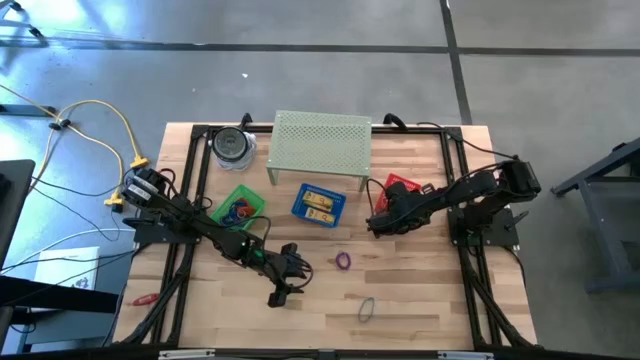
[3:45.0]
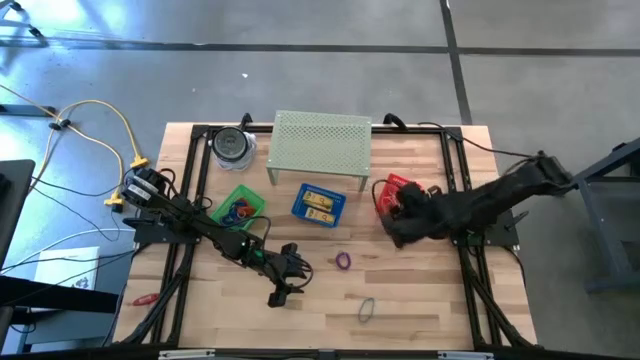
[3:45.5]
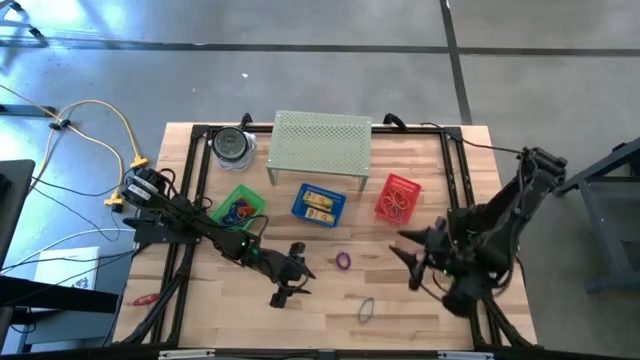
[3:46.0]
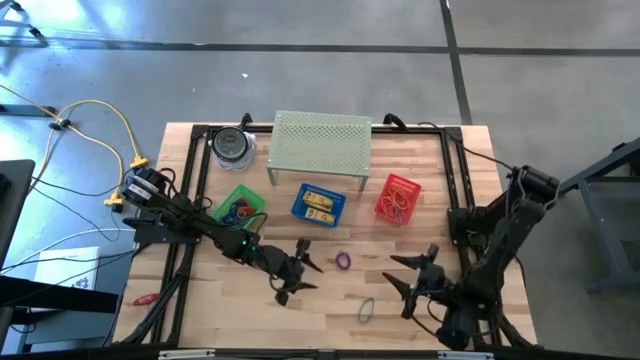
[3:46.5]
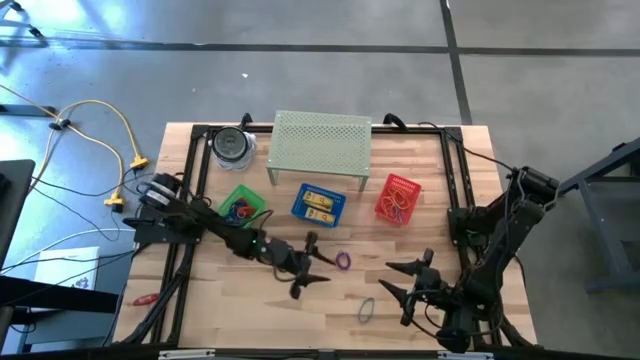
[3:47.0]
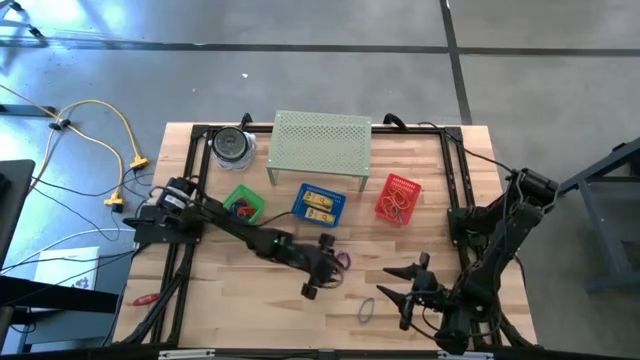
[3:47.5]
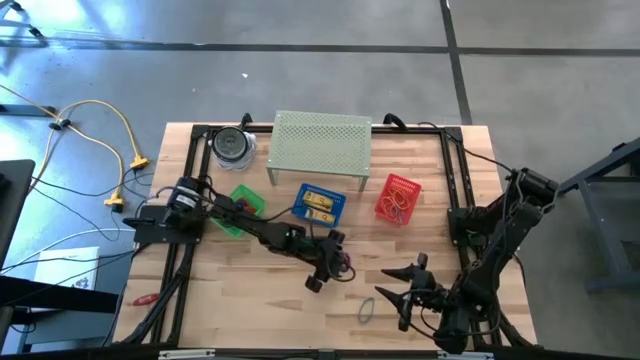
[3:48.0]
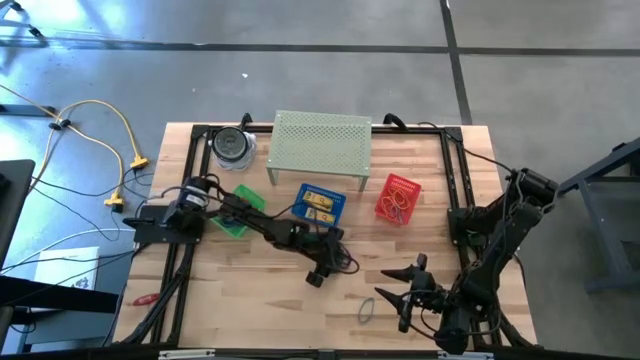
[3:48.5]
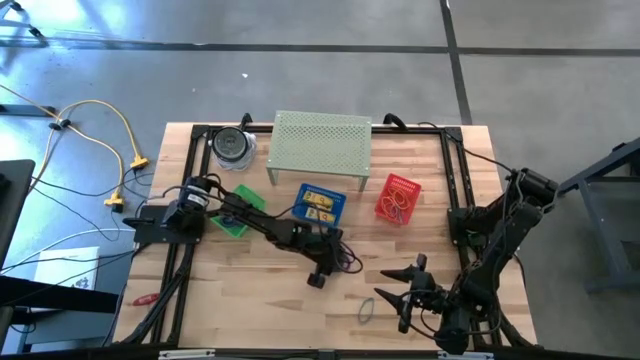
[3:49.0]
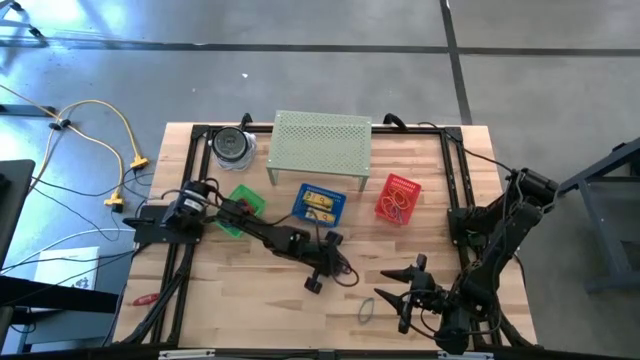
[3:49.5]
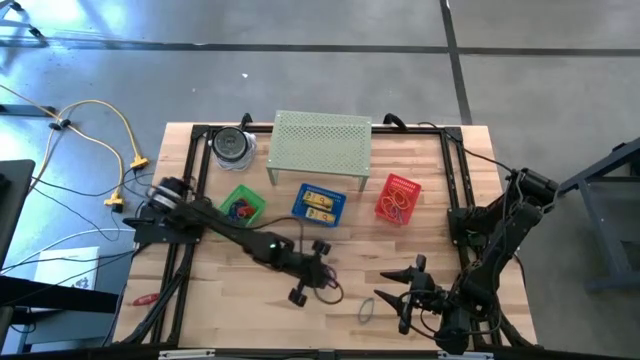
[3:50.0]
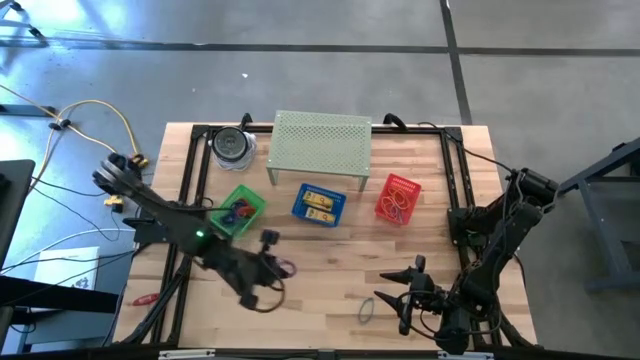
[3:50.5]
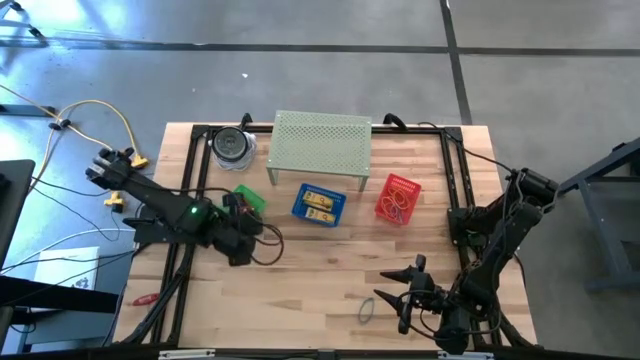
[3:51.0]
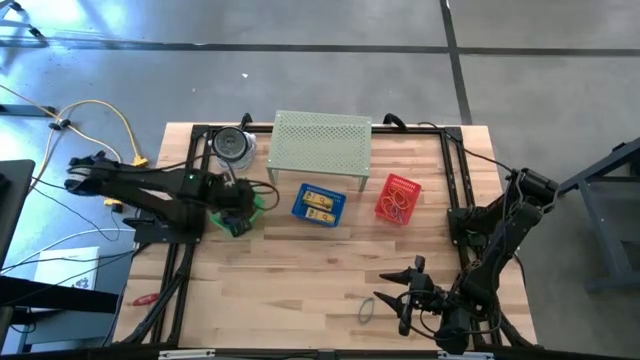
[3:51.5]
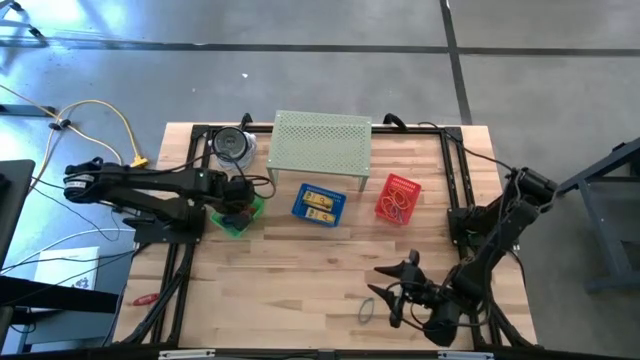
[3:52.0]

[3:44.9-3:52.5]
Task: Pick & Place Office Desk Supplies
Put the purple spring keychain into the green bin

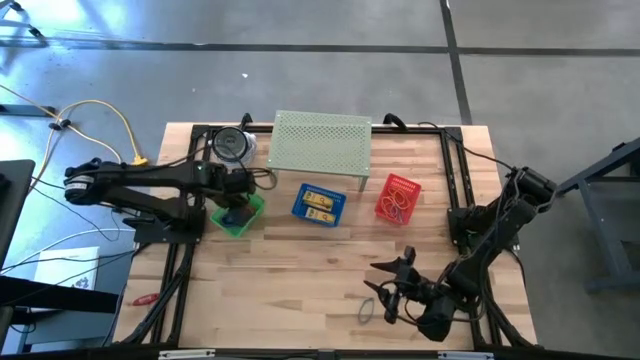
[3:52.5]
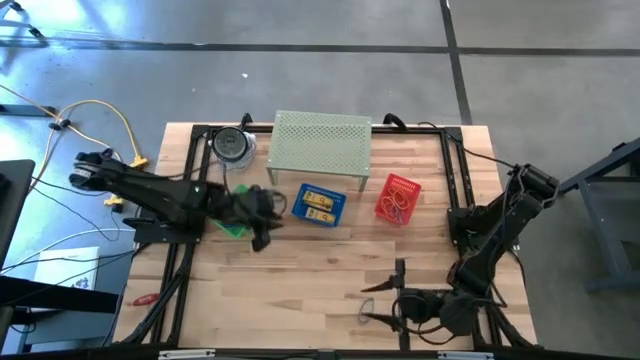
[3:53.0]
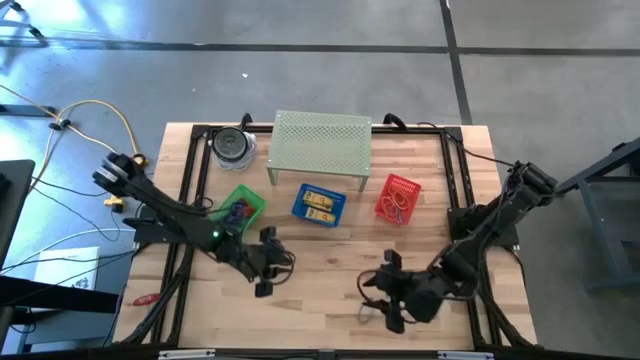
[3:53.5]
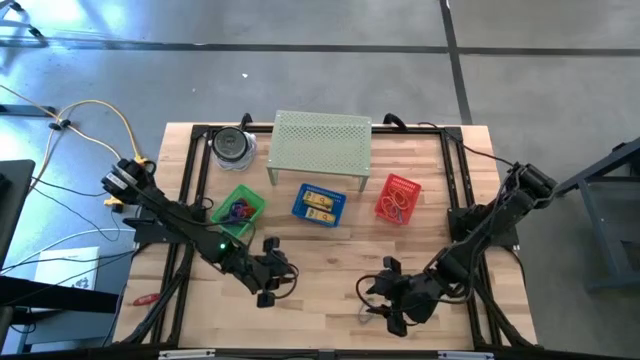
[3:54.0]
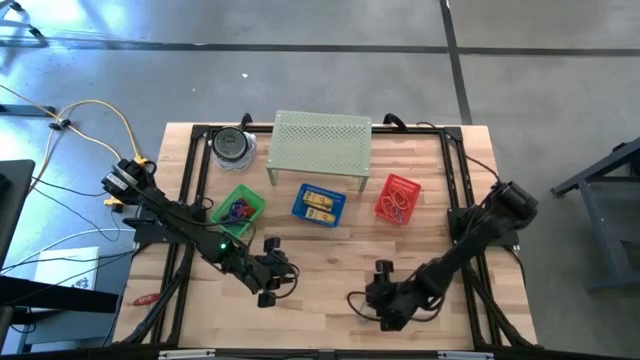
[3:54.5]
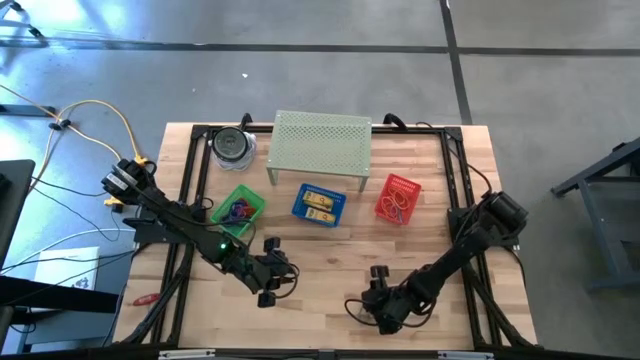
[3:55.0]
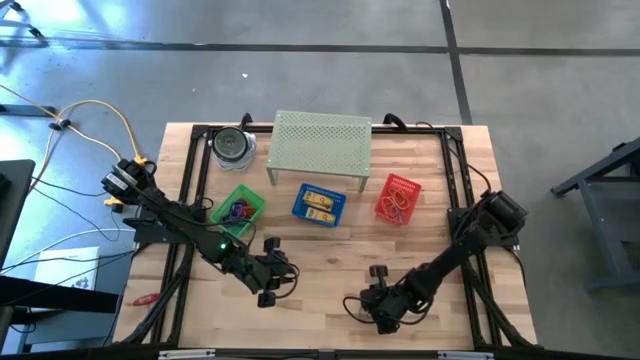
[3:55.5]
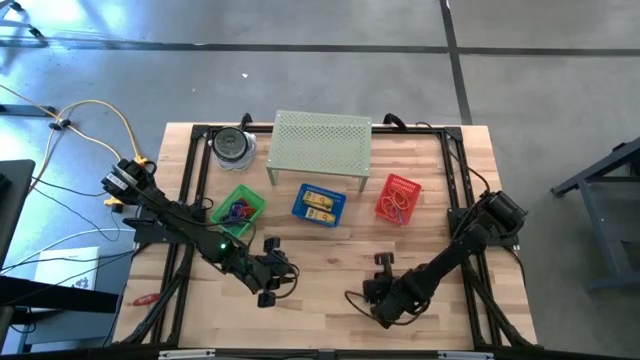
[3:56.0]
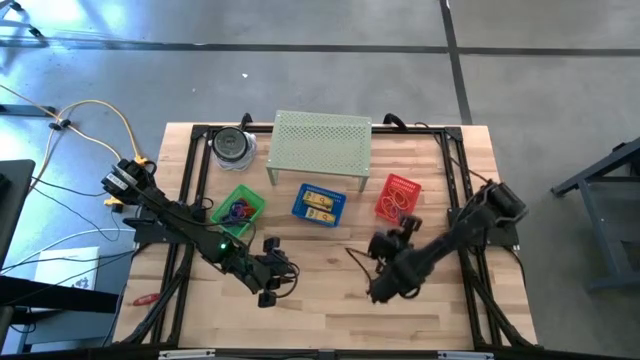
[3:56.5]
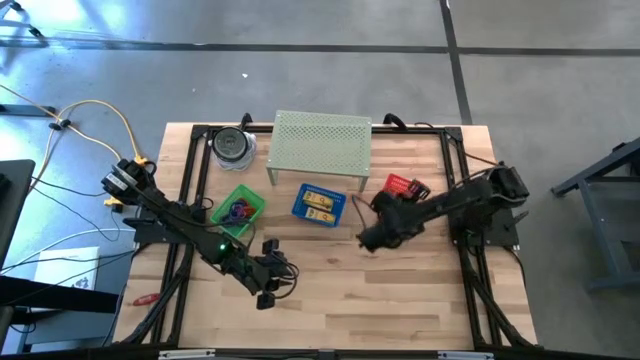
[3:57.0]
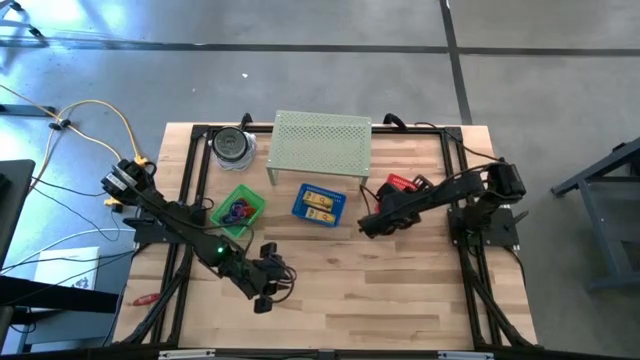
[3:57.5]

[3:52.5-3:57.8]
Put the blue rubber band into the red bin

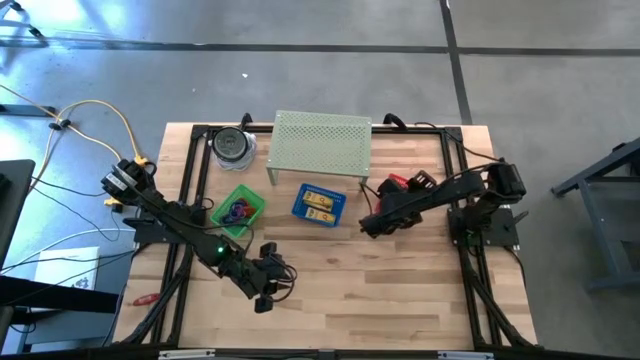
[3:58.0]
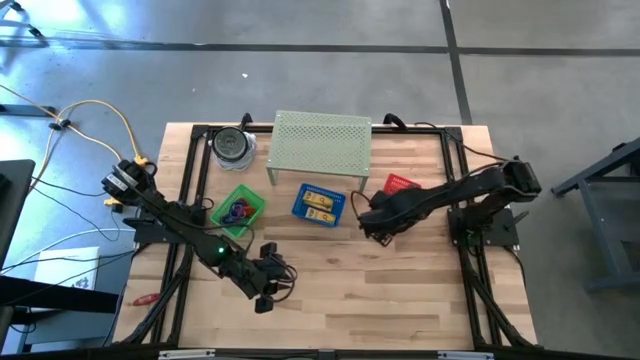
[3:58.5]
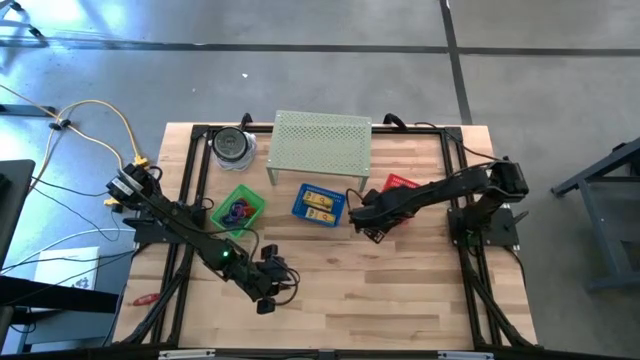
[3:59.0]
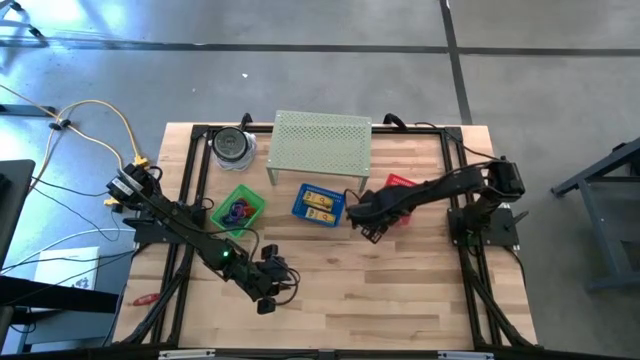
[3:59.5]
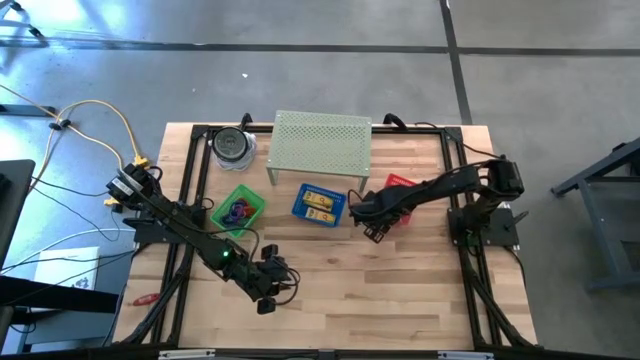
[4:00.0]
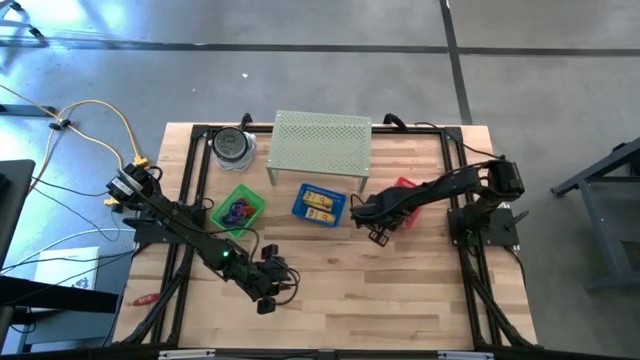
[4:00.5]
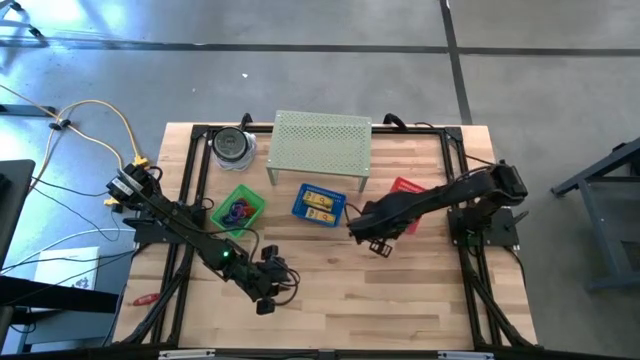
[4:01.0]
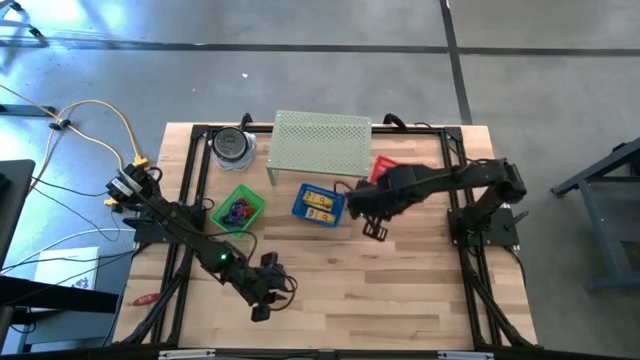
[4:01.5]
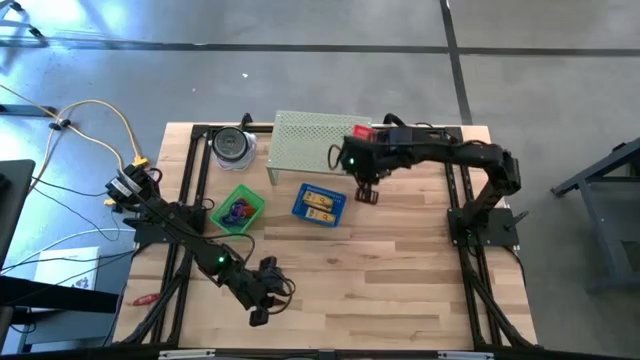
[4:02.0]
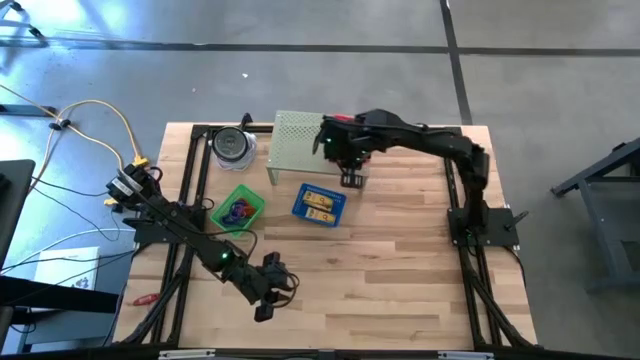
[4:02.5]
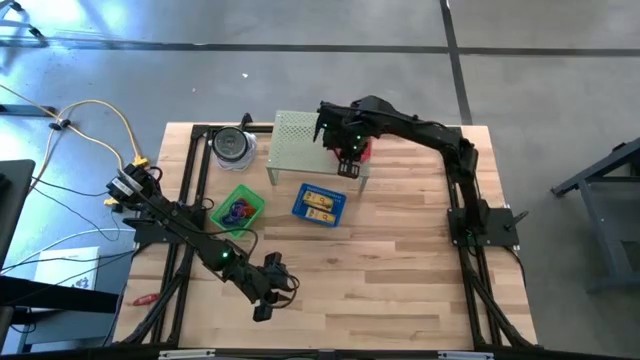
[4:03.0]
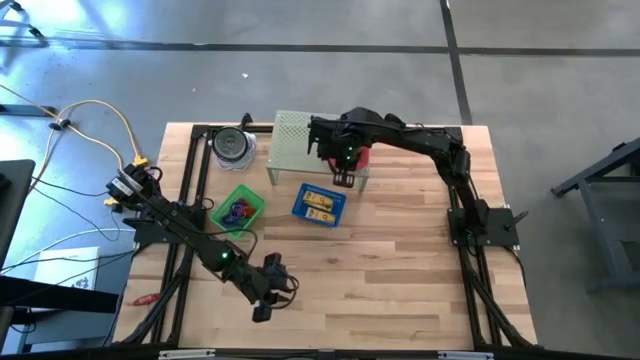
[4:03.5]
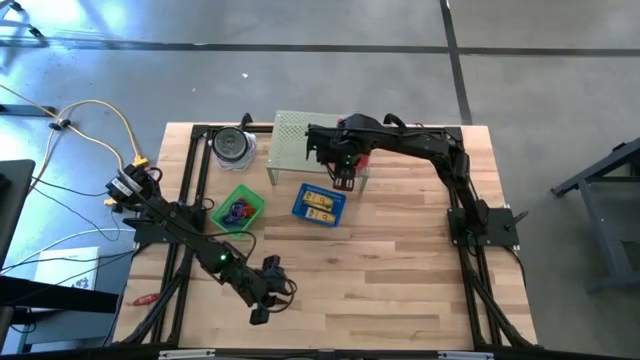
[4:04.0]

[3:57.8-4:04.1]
Put the orange bin on the shelf

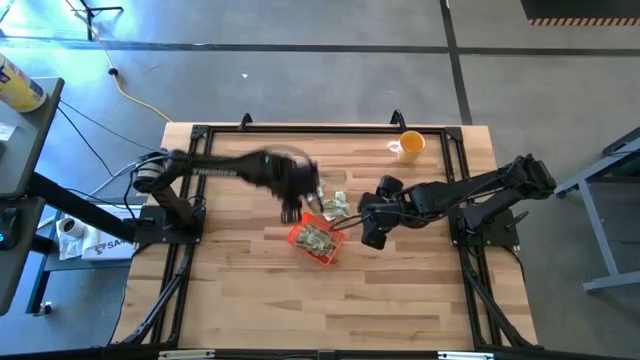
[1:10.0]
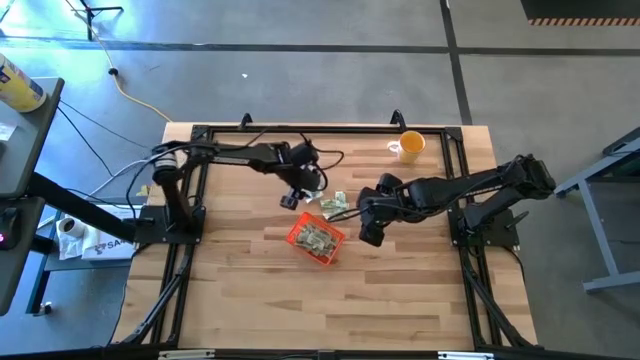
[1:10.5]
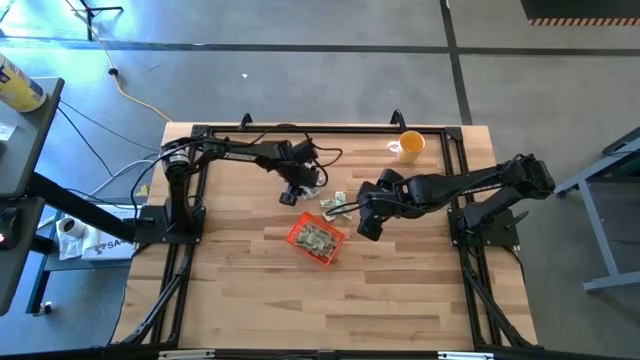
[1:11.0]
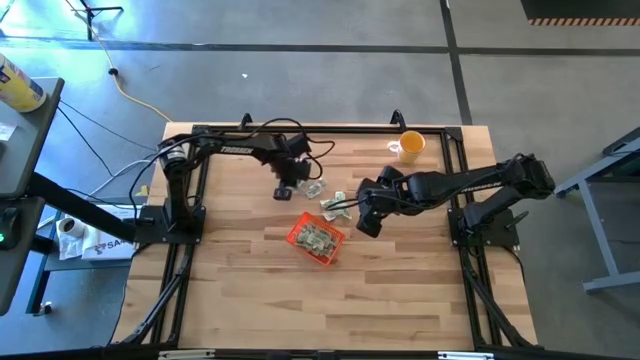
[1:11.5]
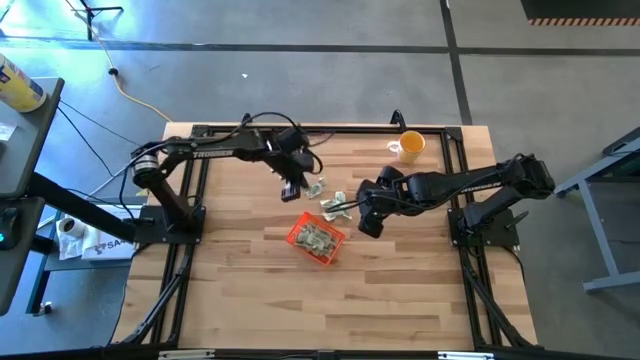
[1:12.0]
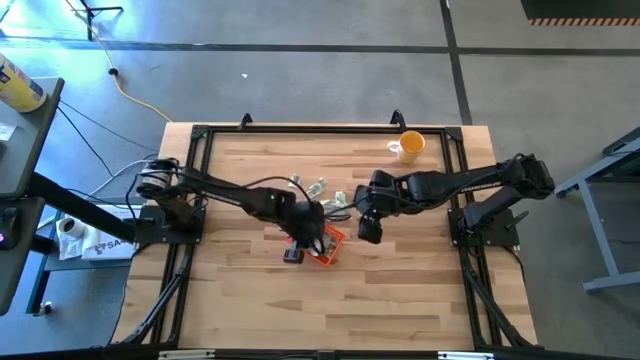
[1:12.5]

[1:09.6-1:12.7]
Task: Pick and place Stevia / Truvia into bins
Put the stevia packet into the orange bin
